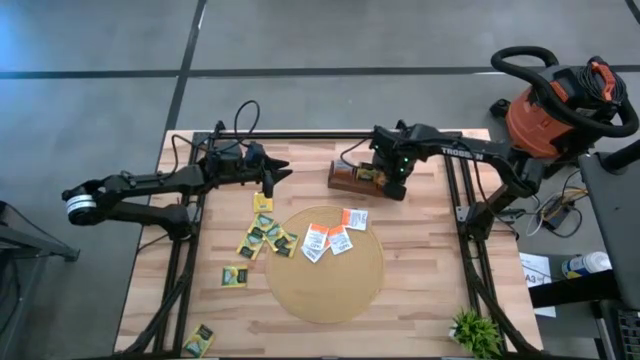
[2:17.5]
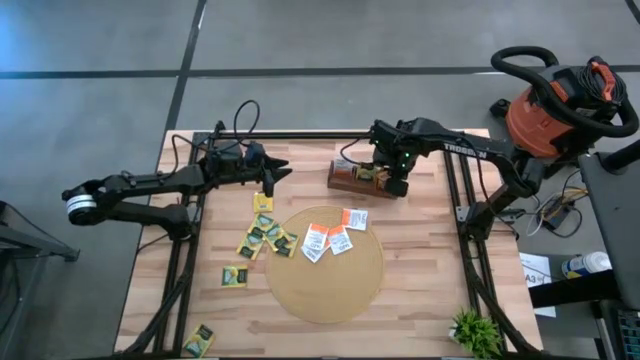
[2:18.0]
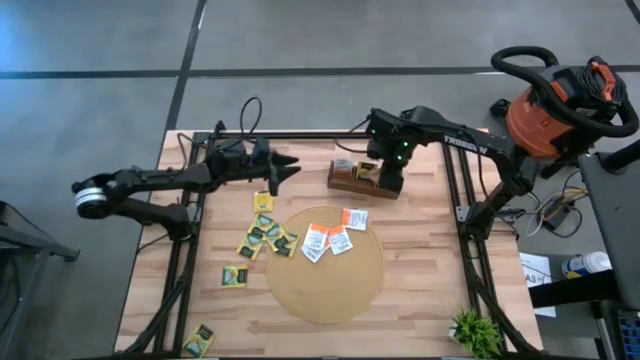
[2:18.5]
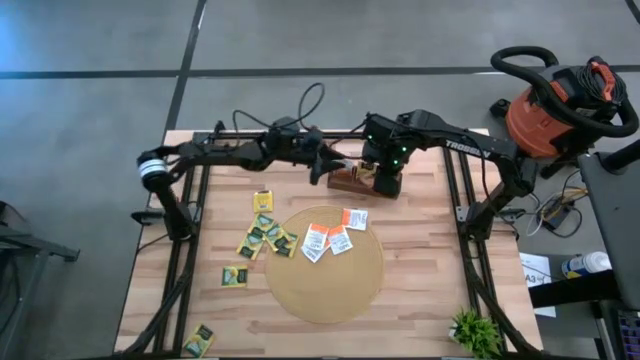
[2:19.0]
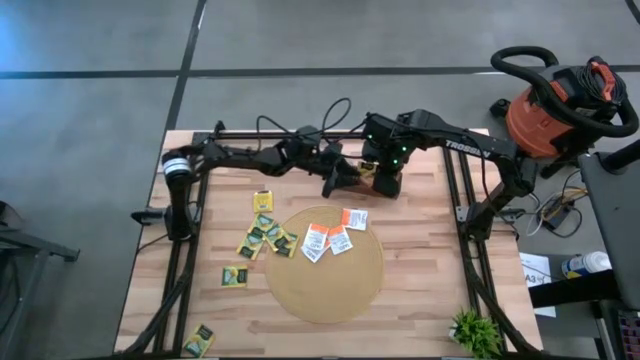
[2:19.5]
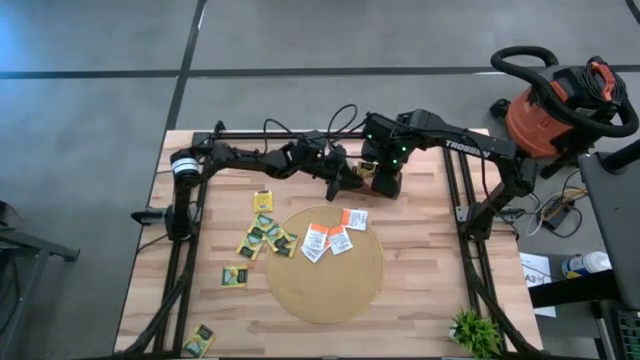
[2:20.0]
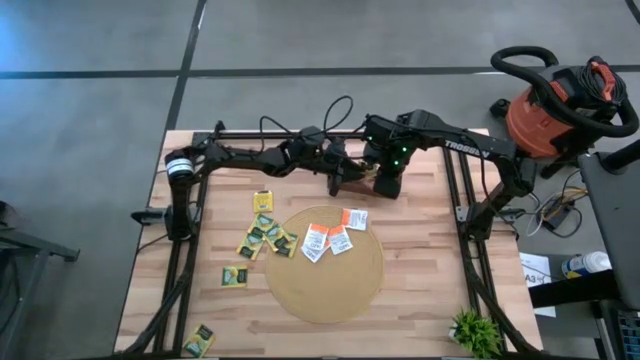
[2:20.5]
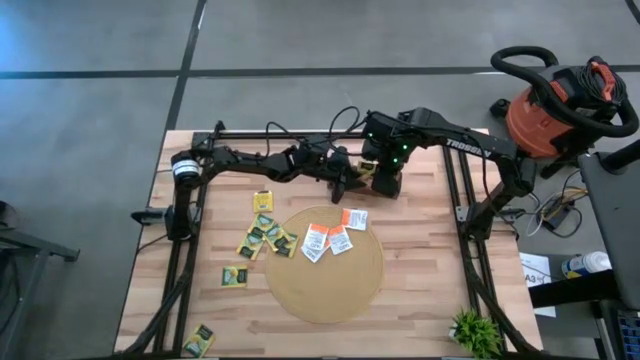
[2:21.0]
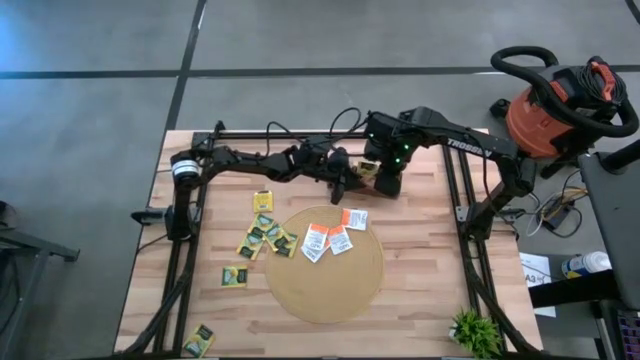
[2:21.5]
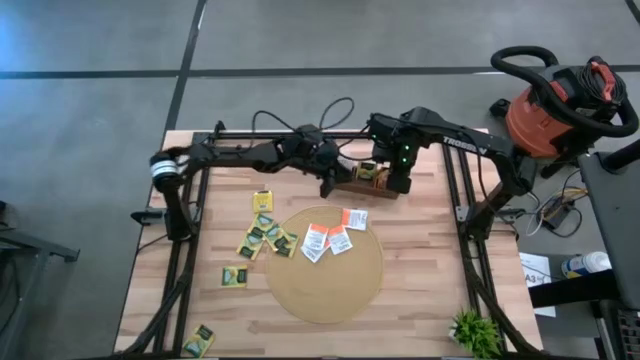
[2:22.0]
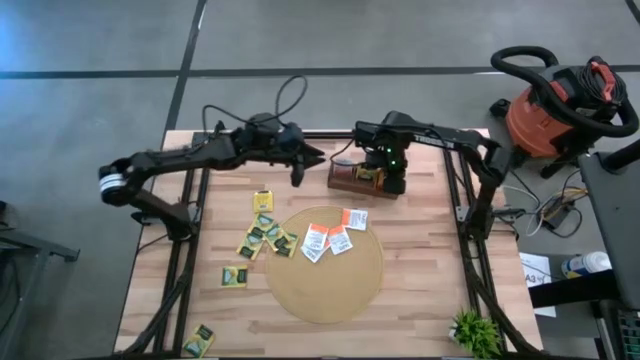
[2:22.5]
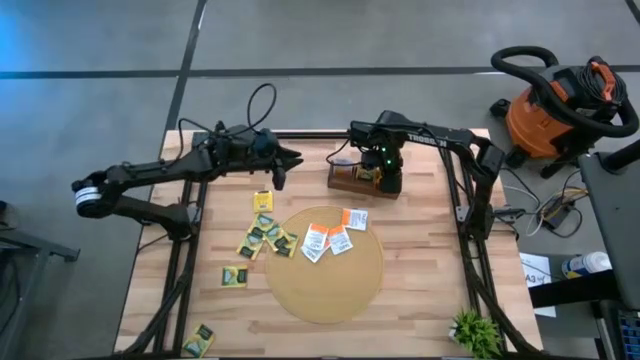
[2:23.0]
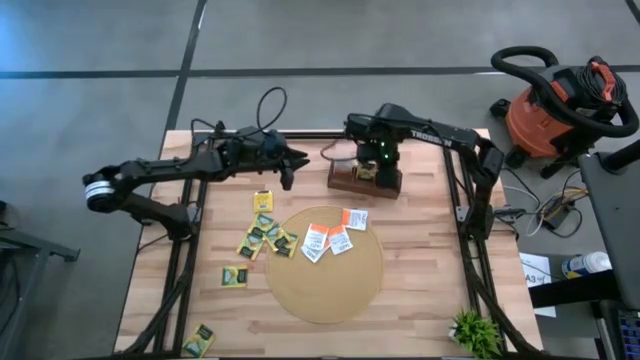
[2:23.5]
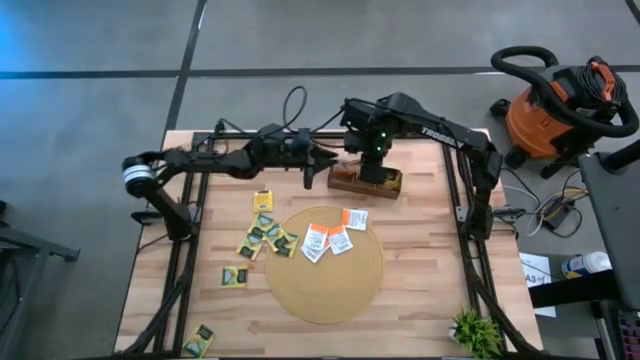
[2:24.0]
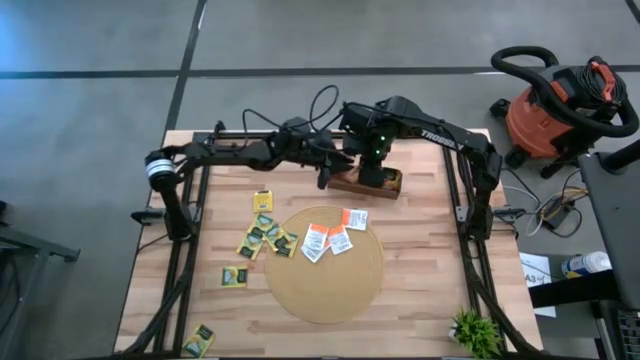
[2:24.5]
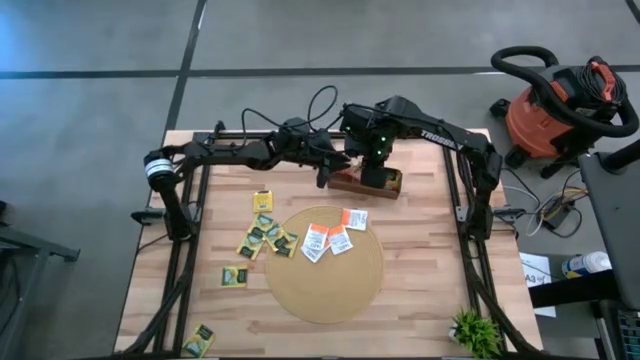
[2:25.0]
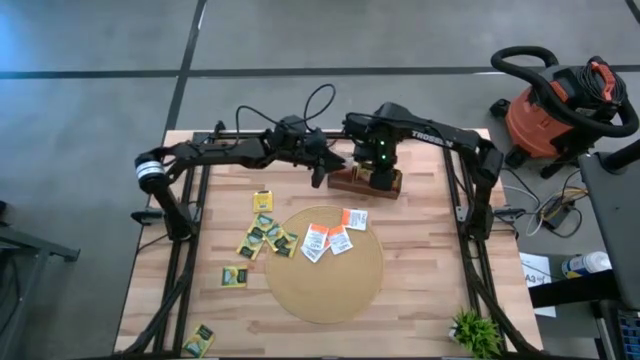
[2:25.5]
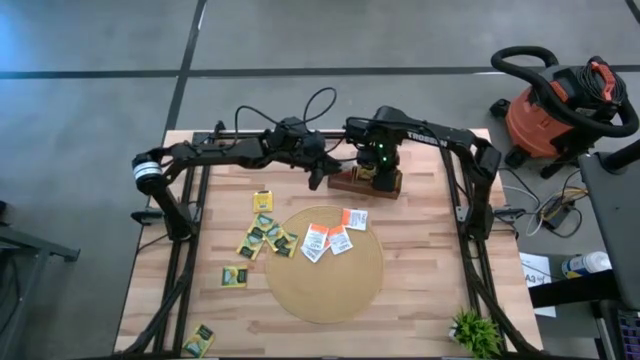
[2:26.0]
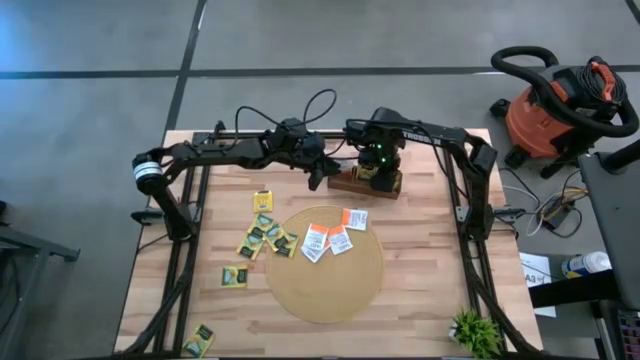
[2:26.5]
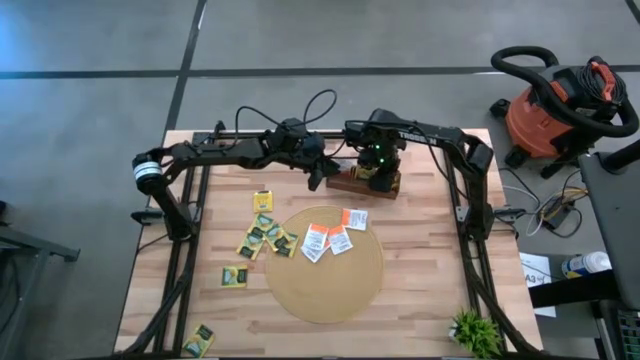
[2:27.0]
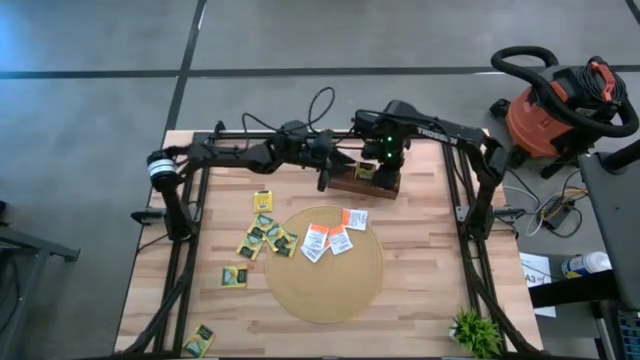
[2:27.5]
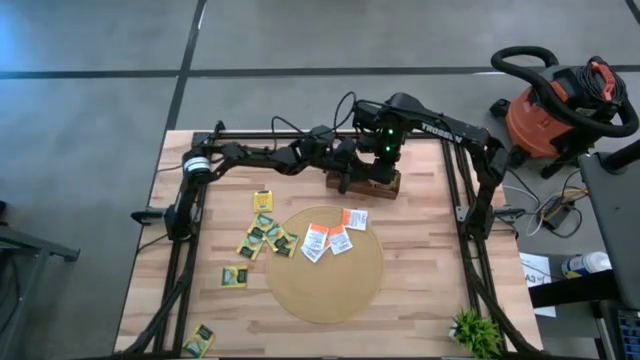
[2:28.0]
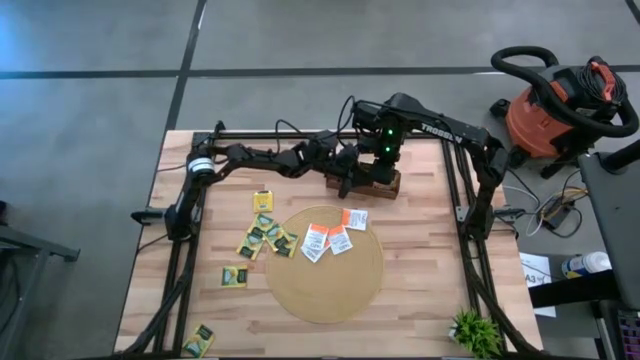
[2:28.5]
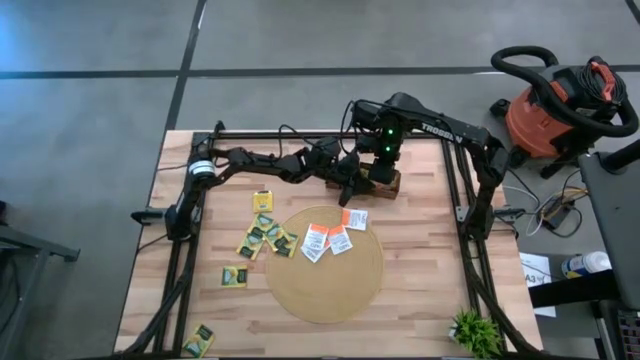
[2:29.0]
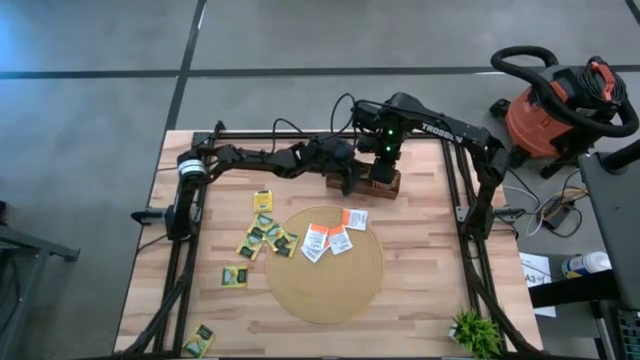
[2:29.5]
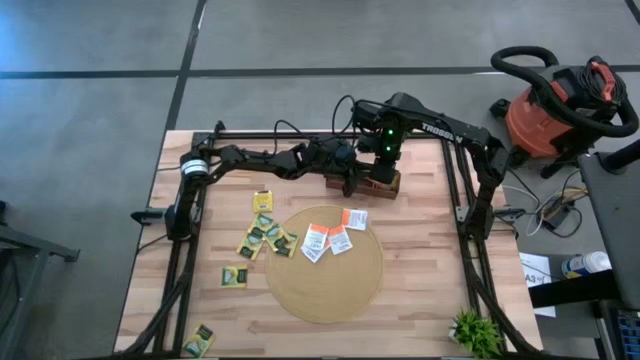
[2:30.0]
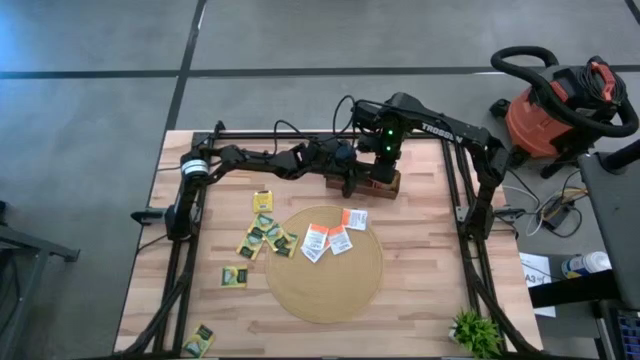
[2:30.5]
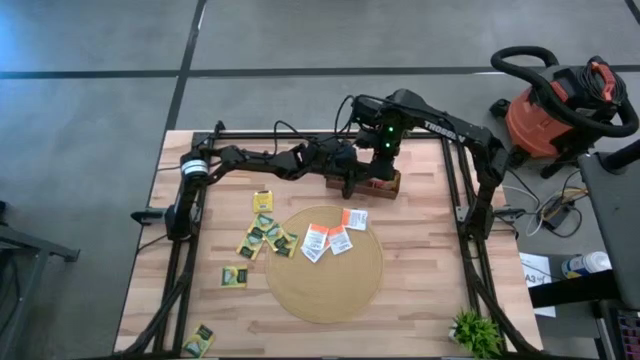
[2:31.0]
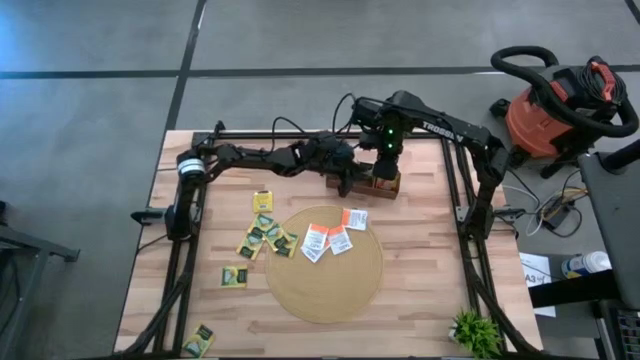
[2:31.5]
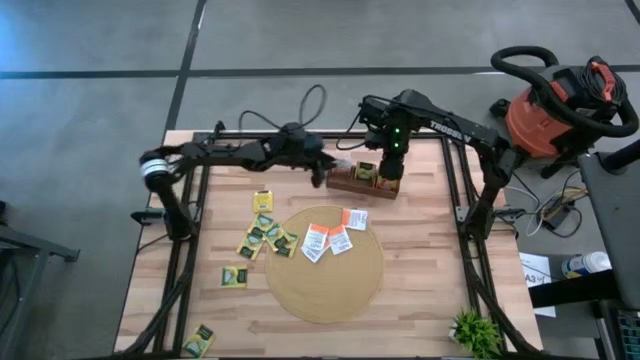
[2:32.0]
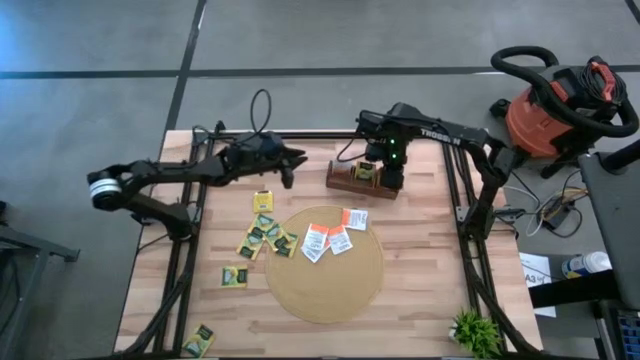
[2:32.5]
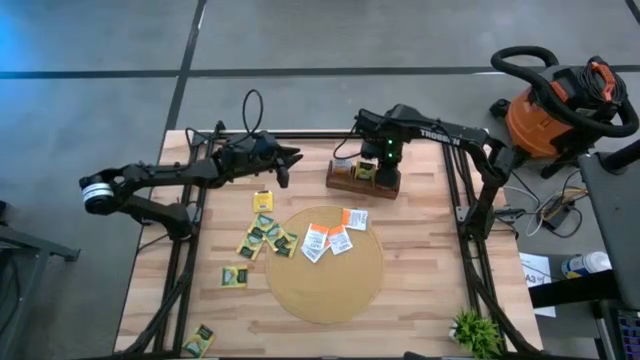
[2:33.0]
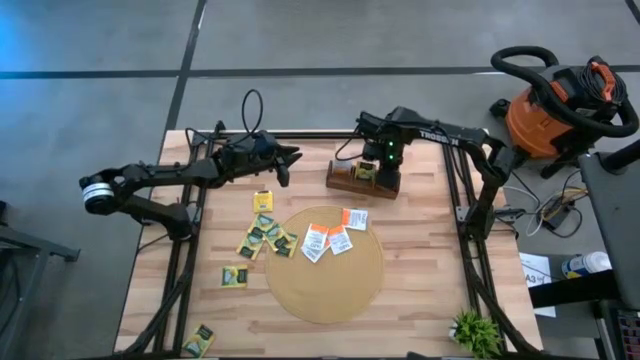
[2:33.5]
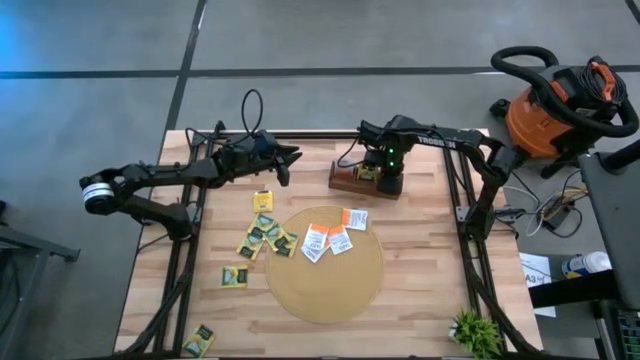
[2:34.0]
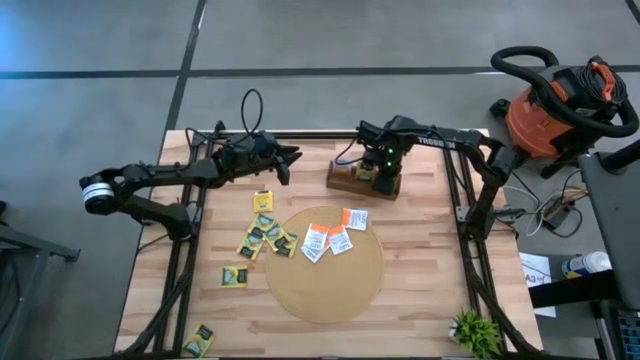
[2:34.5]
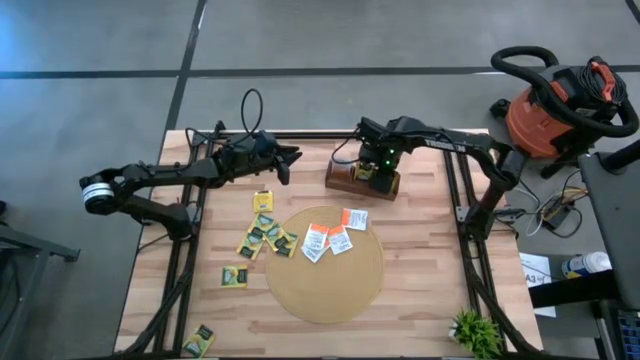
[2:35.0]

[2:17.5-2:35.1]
Task: Pick & Place Tea
Put the mango tea bag into the right section of the wooden organizer
